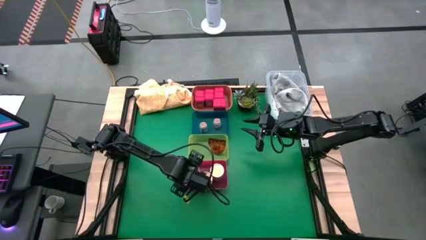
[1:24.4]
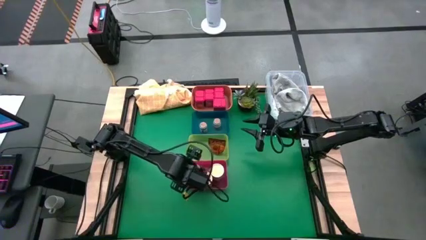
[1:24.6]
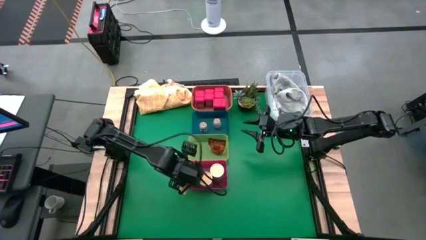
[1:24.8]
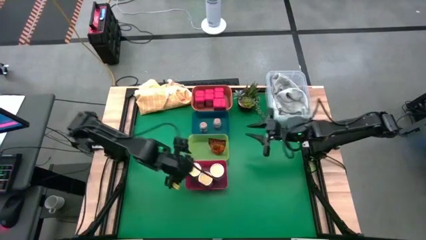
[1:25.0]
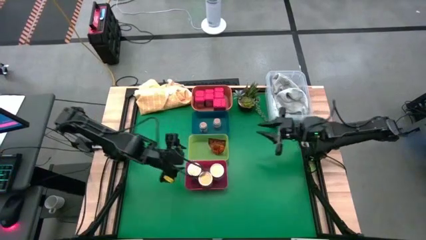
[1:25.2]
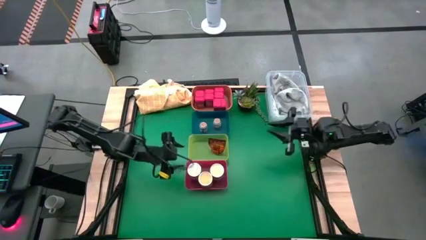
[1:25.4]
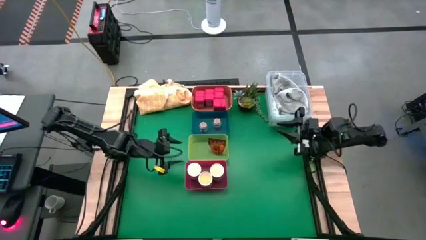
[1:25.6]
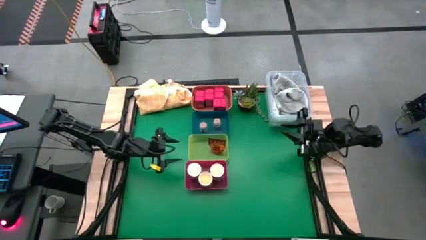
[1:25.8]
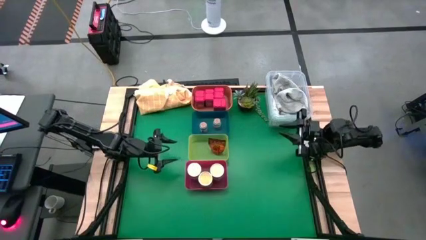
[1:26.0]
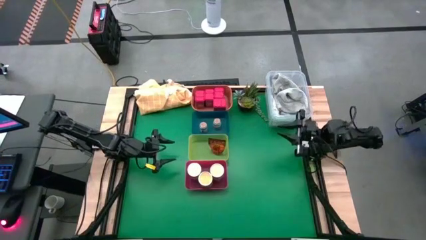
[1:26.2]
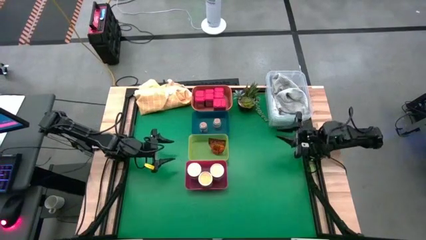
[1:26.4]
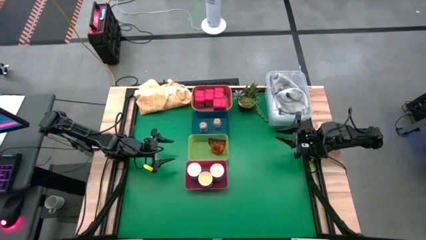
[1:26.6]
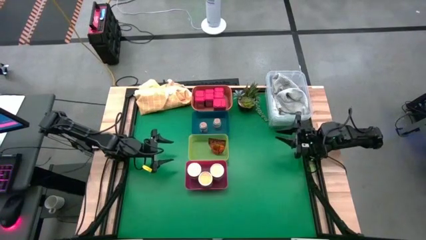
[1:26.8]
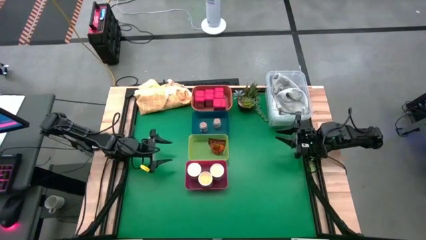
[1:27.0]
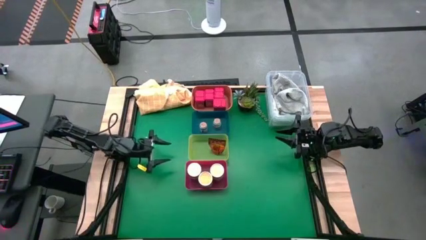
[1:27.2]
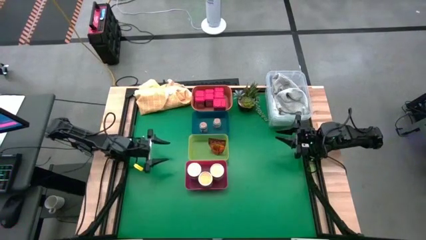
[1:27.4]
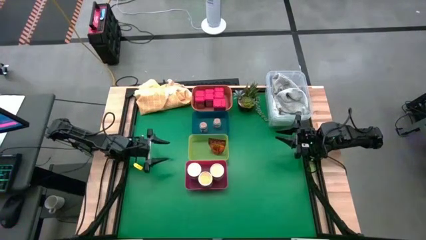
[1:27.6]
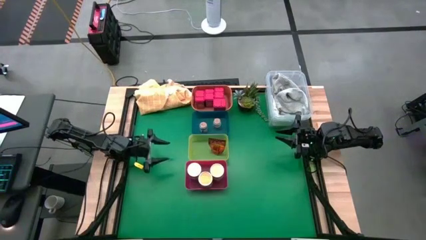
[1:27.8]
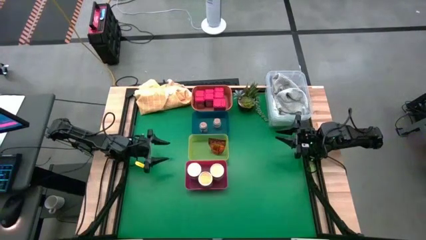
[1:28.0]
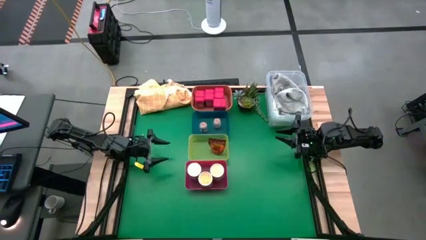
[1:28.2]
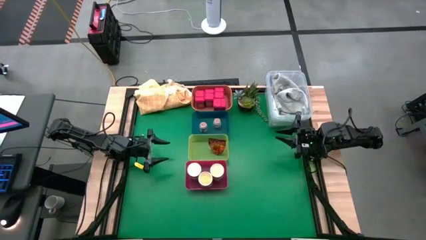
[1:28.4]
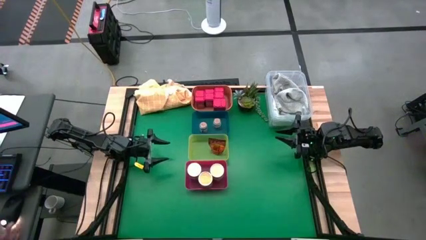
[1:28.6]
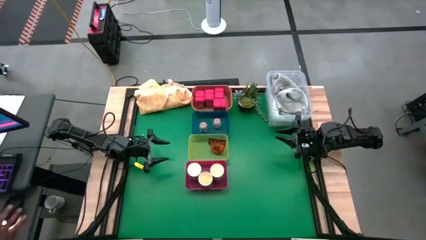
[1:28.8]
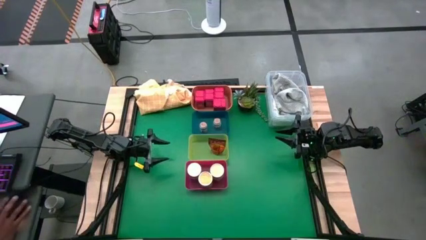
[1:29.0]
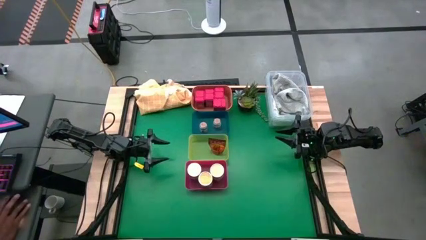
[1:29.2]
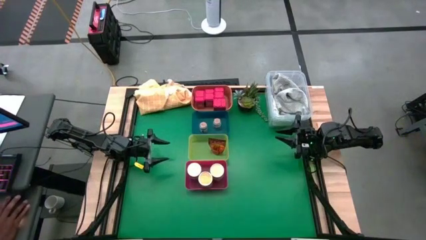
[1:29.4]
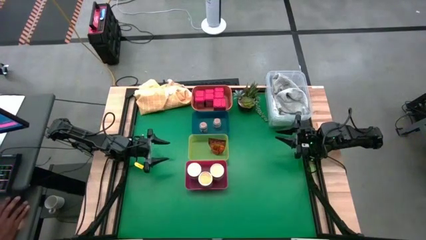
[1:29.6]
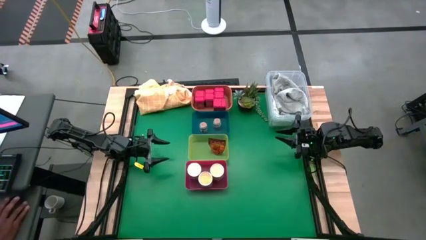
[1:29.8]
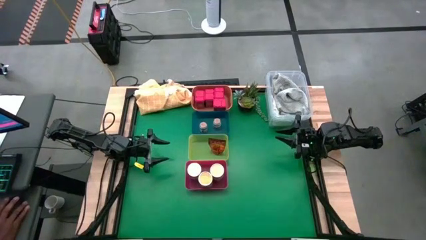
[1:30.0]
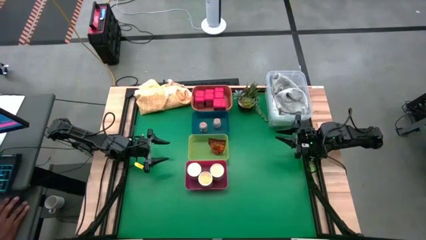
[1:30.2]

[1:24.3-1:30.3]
Task: Sort spices by type
Return to home position

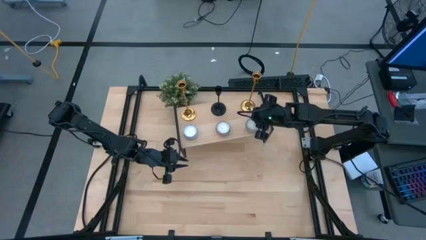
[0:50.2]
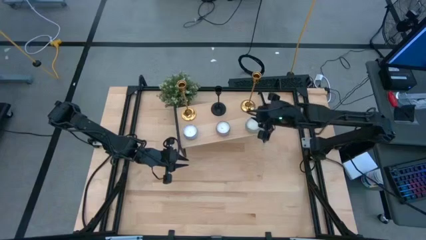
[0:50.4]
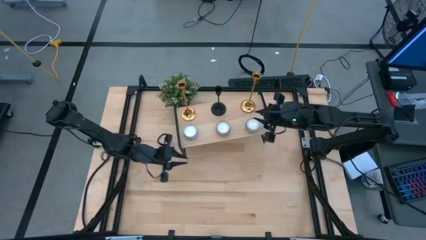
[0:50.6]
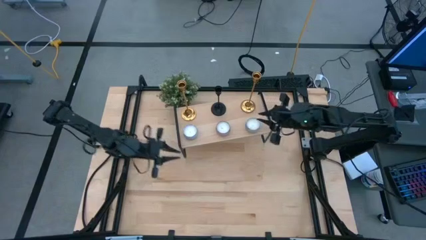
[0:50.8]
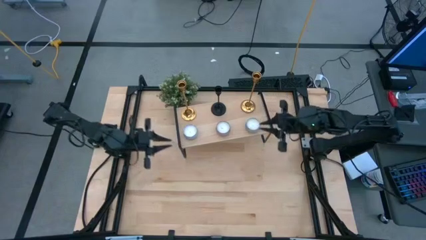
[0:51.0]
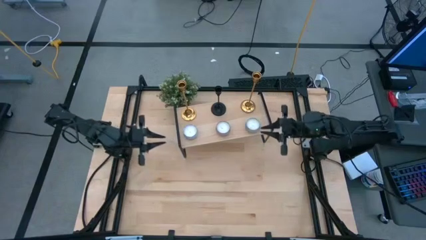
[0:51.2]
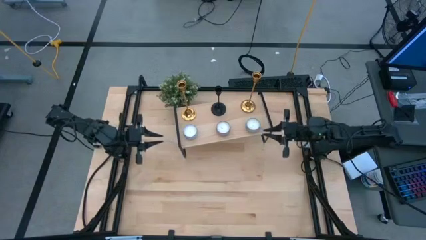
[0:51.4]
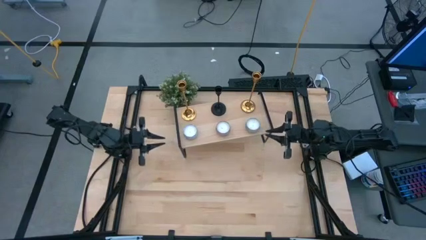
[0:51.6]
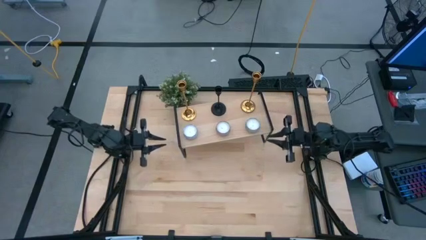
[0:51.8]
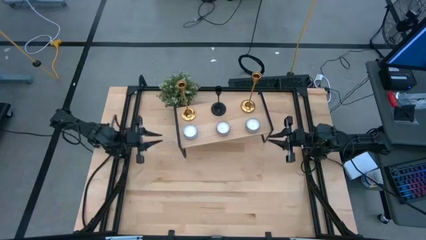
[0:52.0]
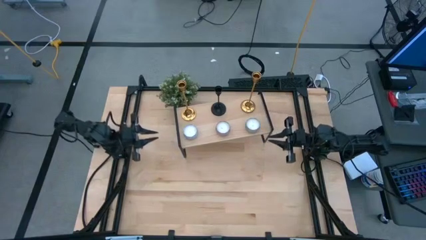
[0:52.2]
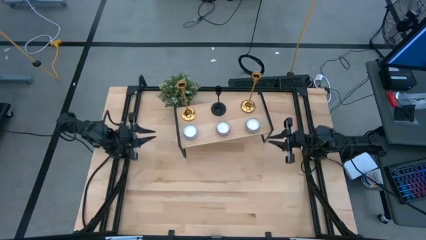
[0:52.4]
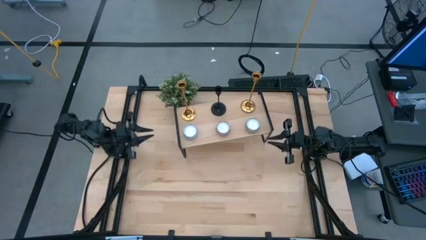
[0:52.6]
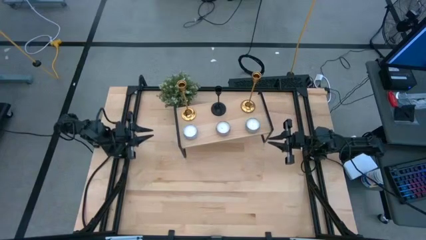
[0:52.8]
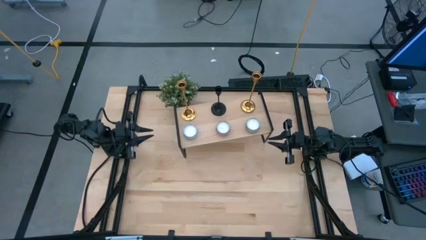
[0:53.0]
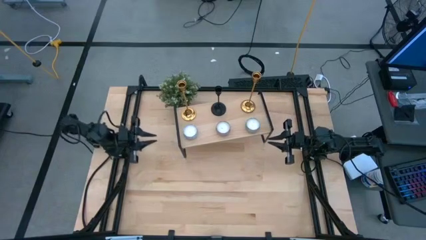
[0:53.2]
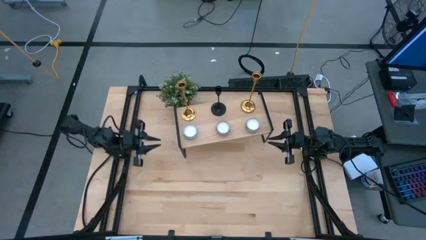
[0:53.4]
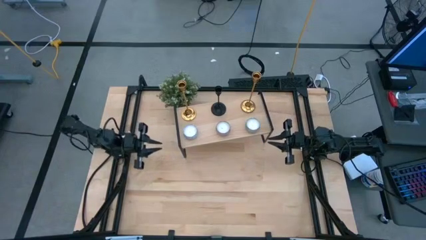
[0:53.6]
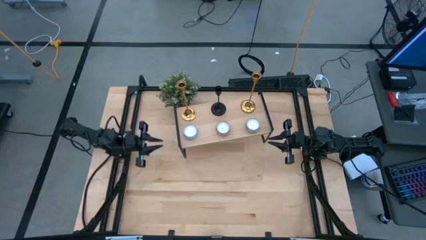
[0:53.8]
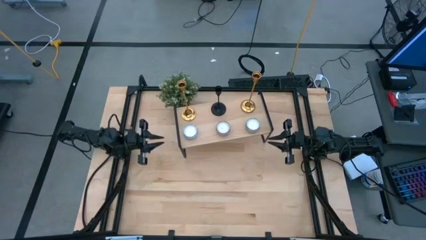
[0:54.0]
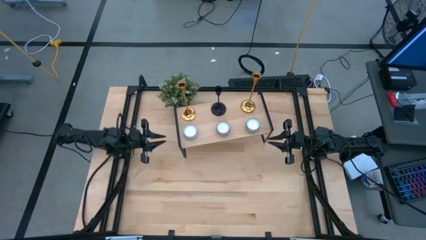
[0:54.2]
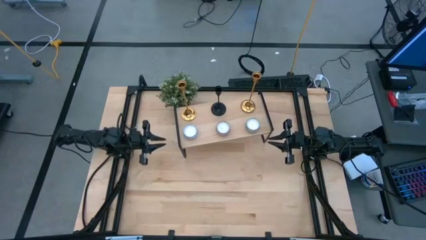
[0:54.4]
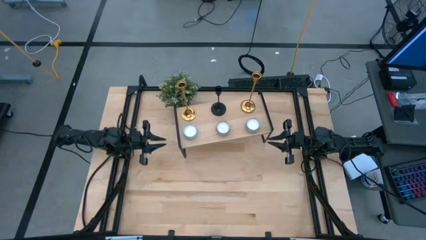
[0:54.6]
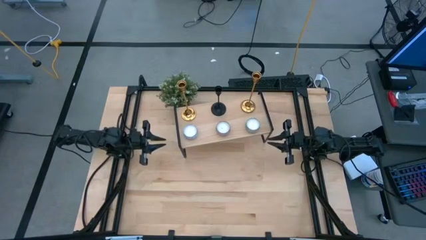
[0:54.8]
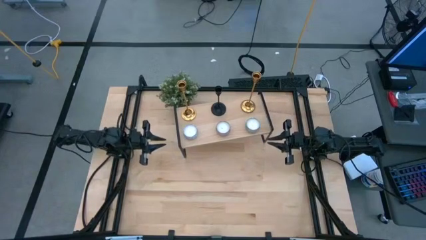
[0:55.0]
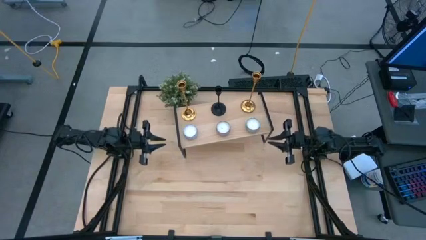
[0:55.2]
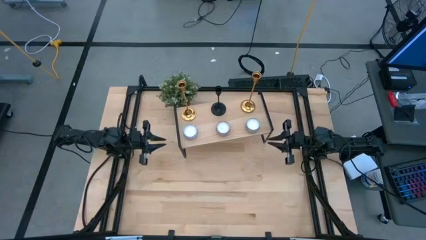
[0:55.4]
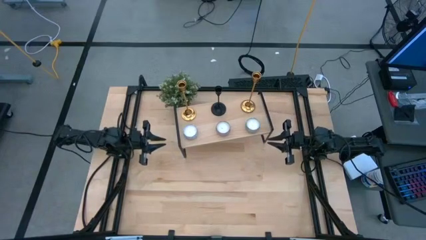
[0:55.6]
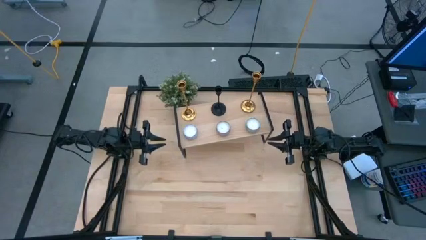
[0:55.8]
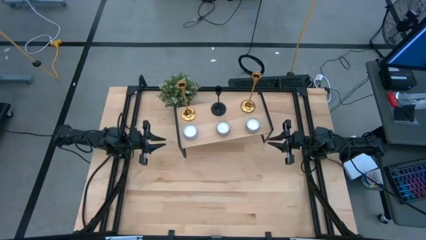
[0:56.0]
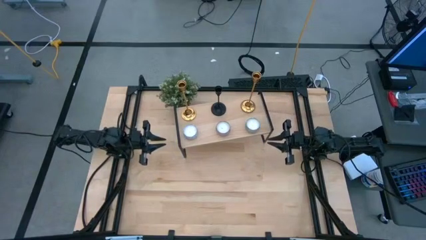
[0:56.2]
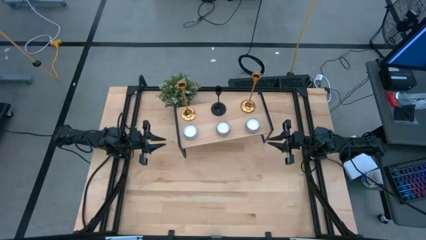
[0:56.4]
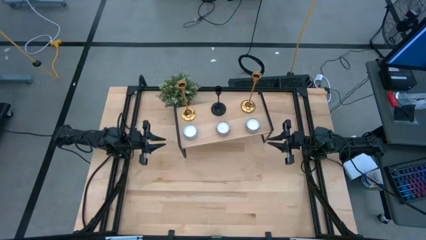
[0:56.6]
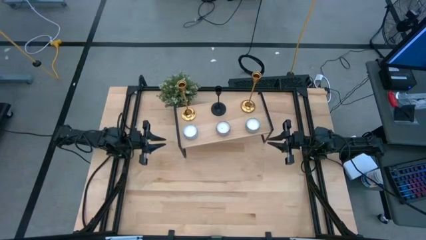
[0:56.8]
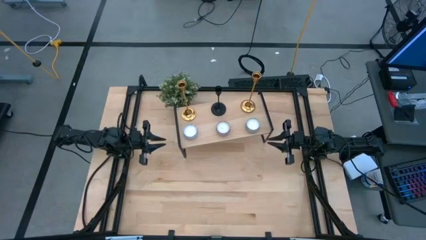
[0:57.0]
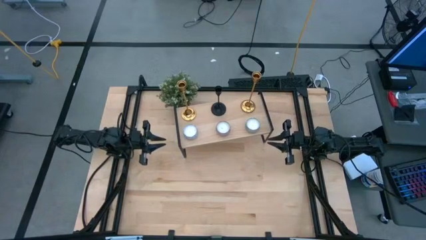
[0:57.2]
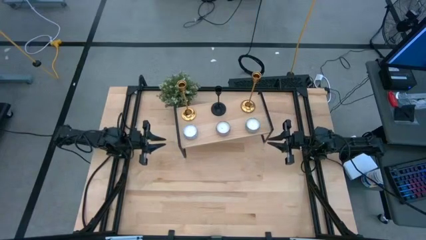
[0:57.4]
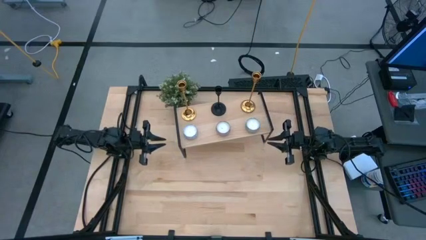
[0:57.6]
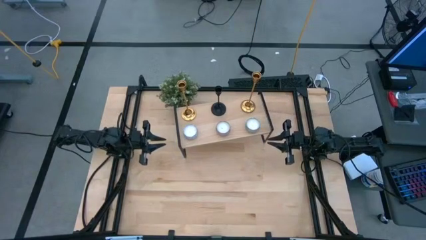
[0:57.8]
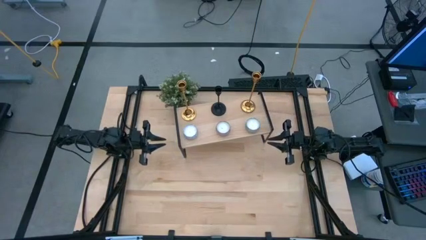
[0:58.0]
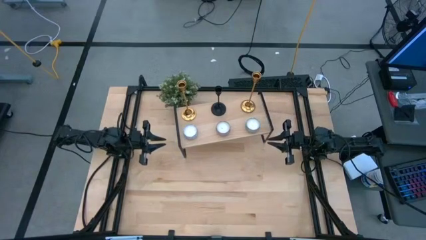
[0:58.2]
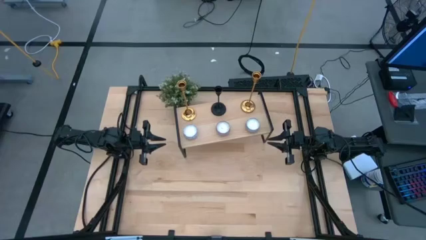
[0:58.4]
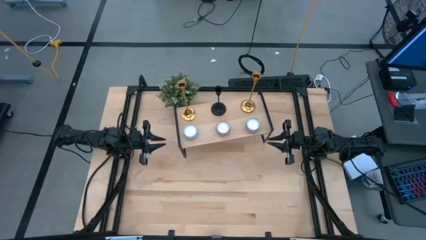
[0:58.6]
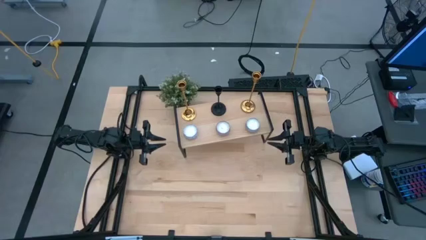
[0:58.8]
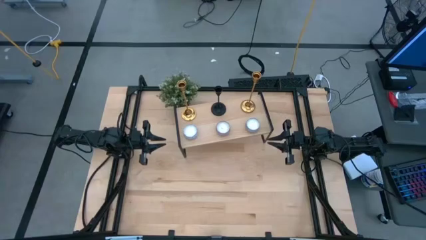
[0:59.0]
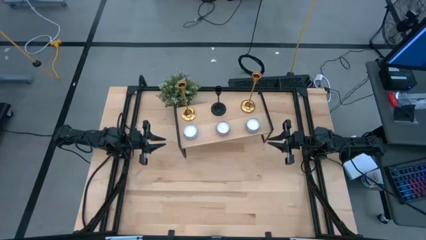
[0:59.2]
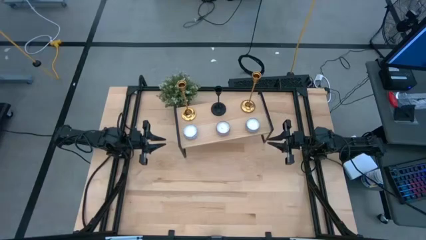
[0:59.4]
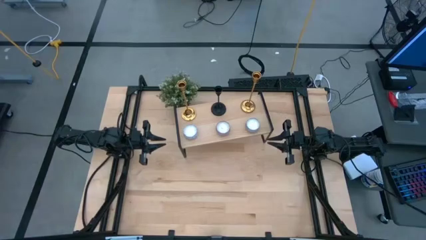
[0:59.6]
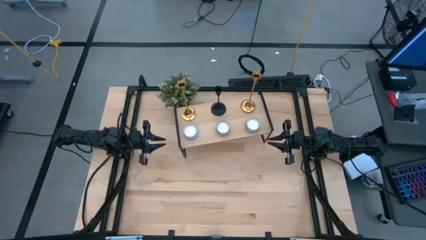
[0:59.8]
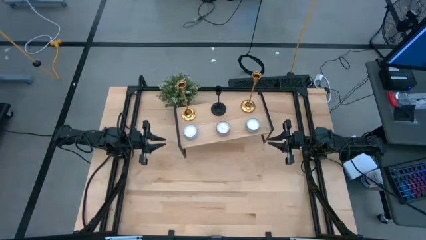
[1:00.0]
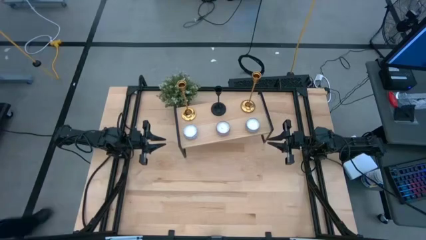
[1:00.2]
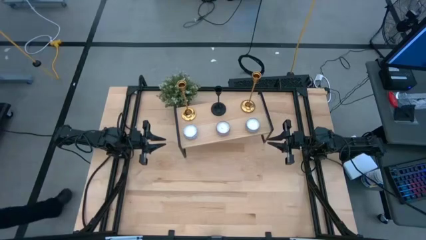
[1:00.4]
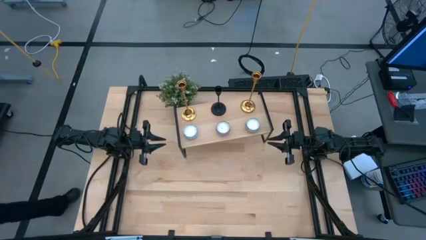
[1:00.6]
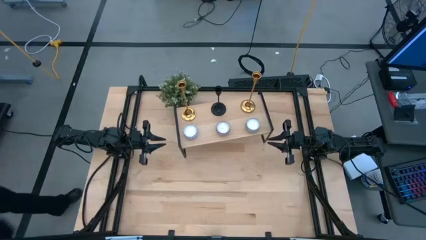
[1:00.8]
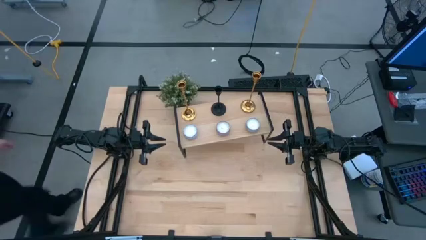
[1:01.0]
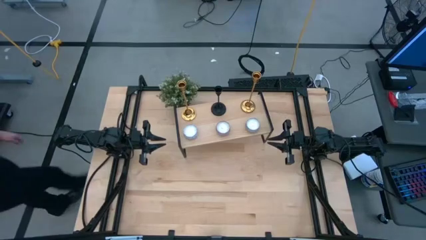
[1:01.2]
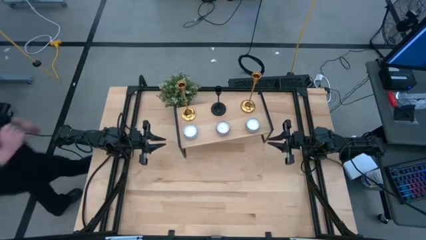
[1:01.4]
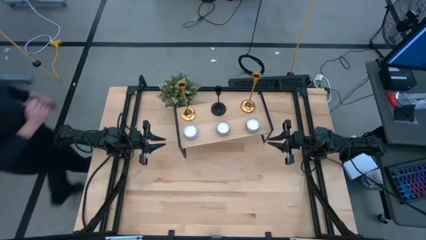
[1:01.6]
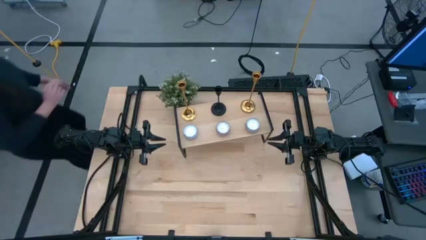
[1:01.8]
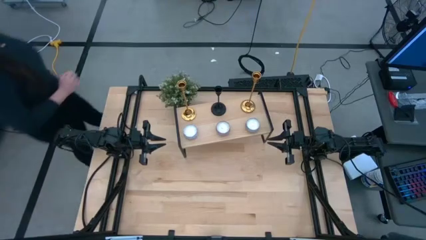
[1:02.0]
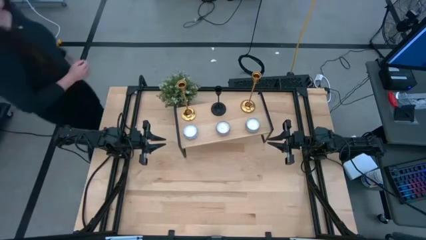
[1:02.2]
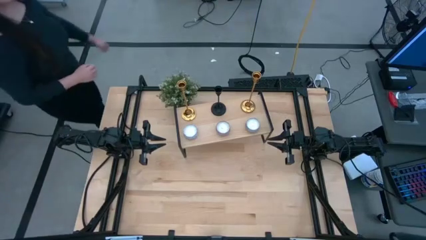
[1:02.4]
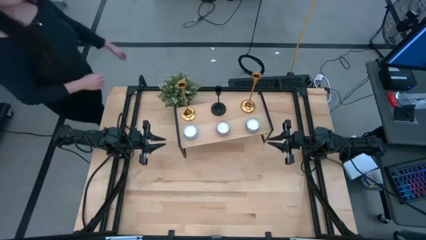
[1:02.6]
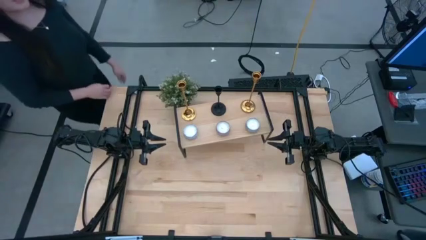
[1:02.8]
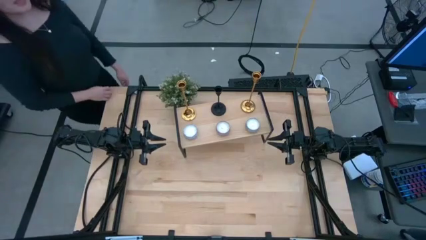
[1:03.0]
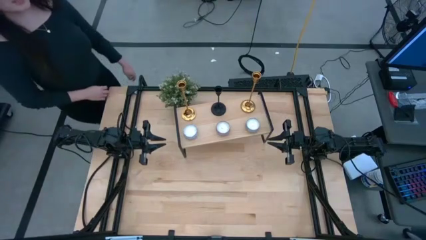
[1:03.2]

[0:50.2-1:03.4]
Task: Pick & Place candle stick holders
Return to Home Position
